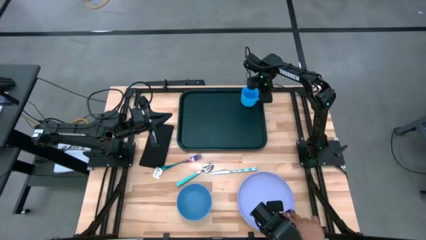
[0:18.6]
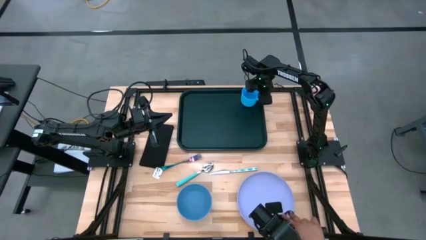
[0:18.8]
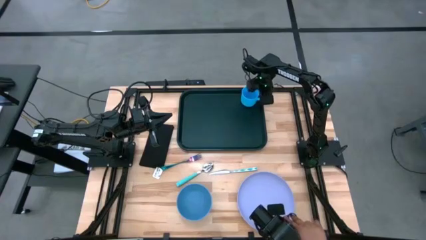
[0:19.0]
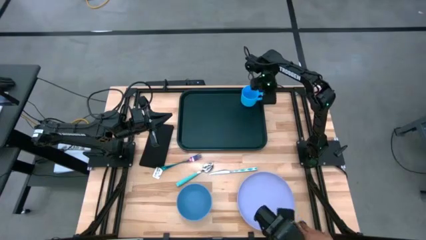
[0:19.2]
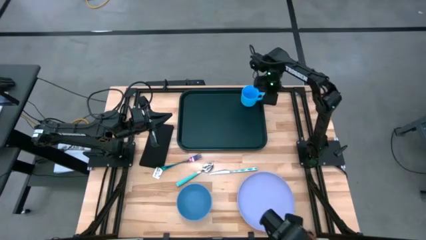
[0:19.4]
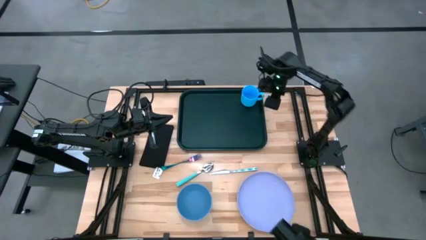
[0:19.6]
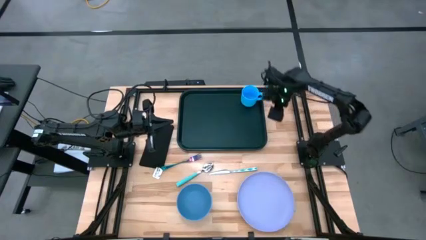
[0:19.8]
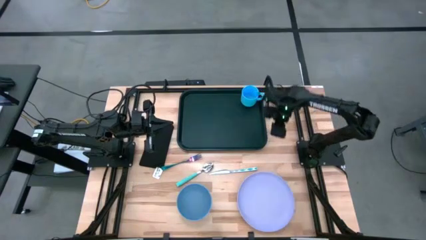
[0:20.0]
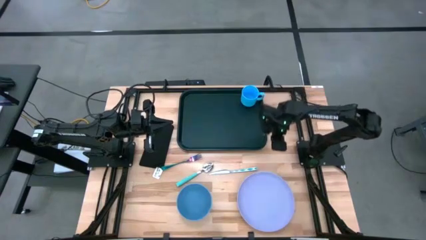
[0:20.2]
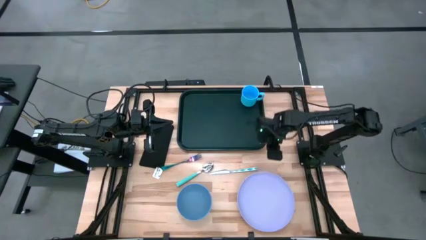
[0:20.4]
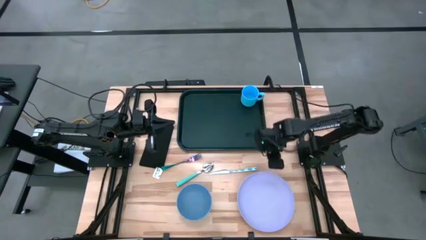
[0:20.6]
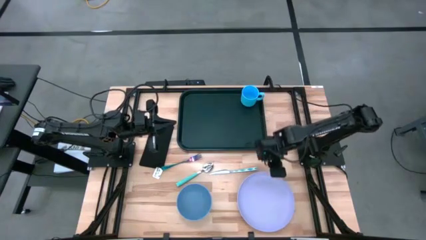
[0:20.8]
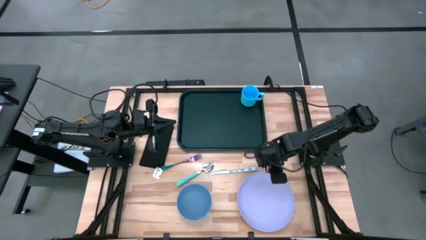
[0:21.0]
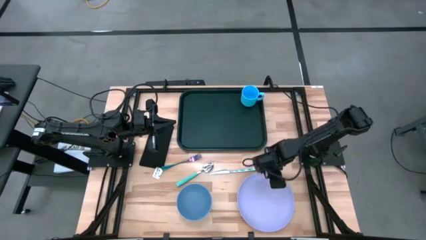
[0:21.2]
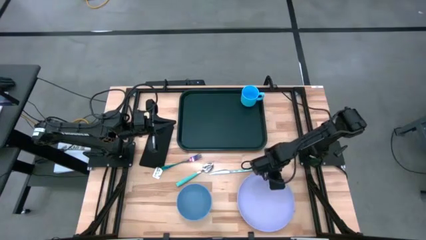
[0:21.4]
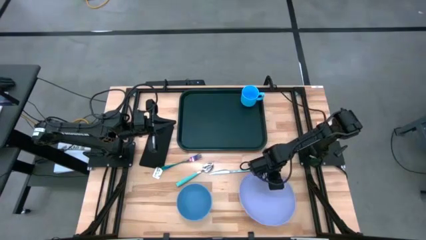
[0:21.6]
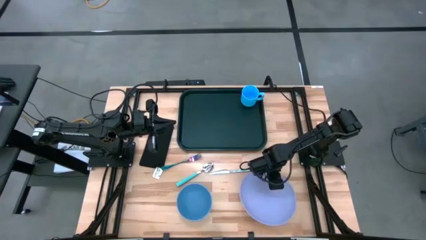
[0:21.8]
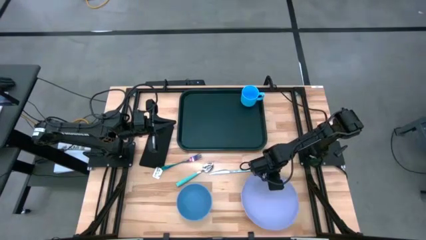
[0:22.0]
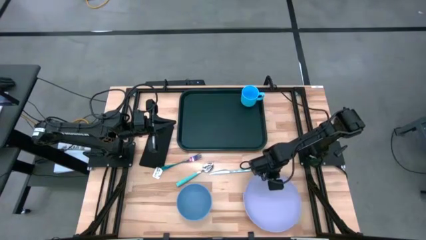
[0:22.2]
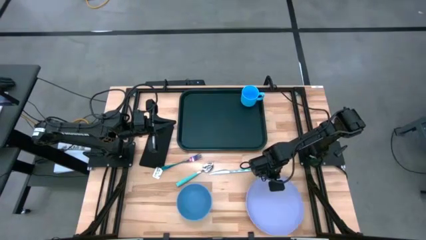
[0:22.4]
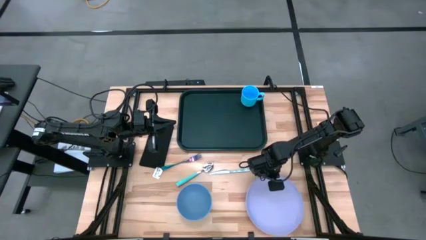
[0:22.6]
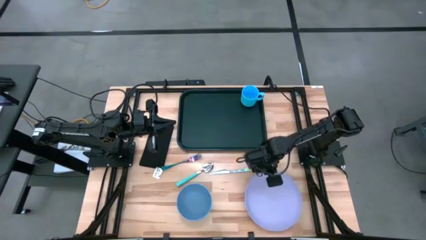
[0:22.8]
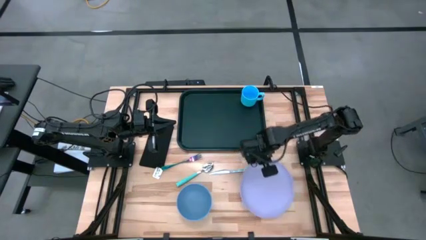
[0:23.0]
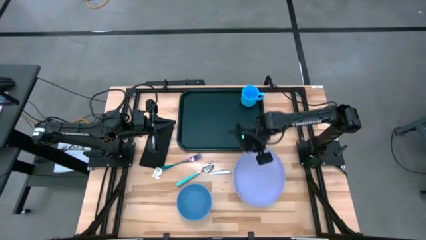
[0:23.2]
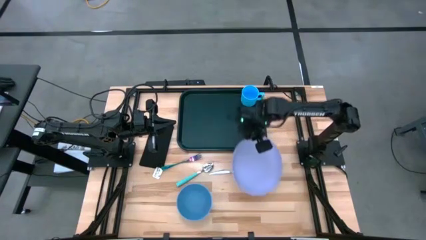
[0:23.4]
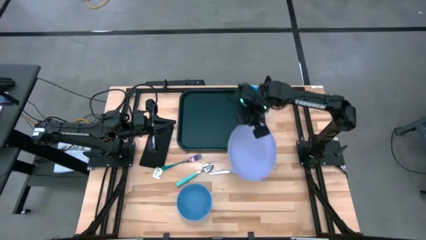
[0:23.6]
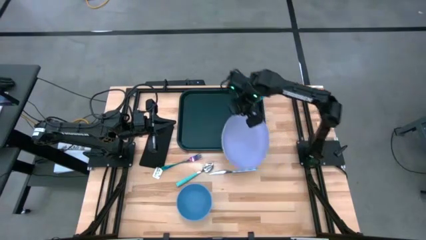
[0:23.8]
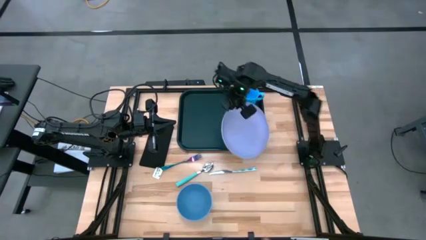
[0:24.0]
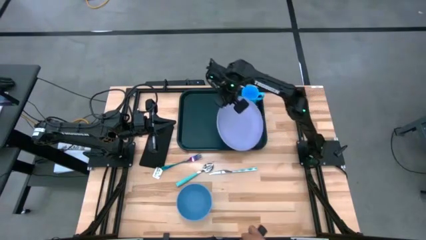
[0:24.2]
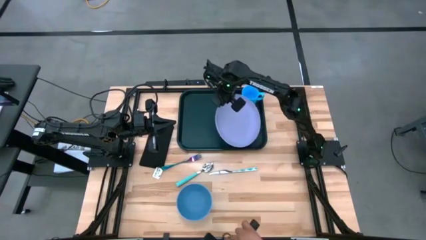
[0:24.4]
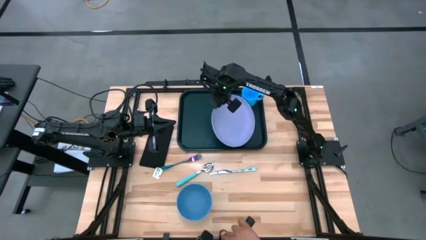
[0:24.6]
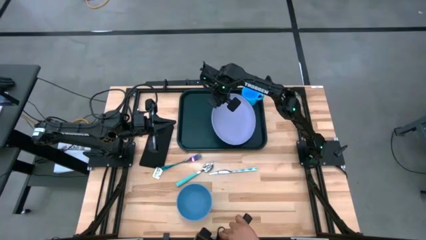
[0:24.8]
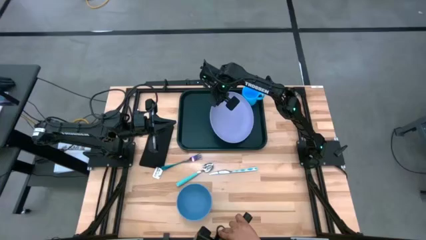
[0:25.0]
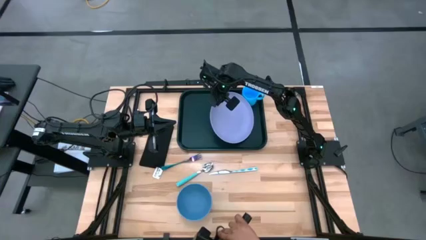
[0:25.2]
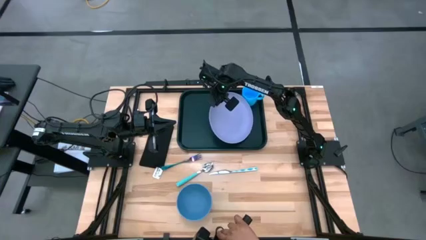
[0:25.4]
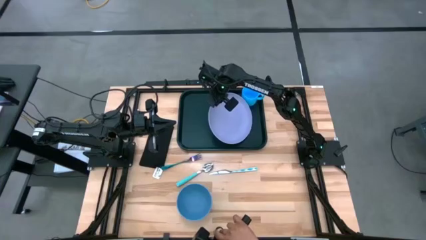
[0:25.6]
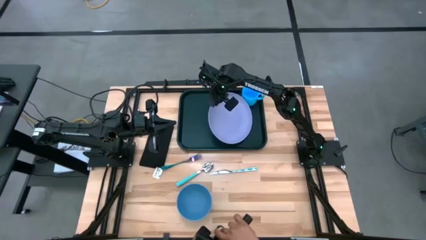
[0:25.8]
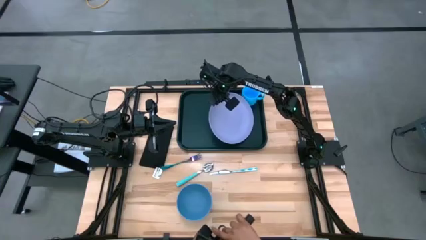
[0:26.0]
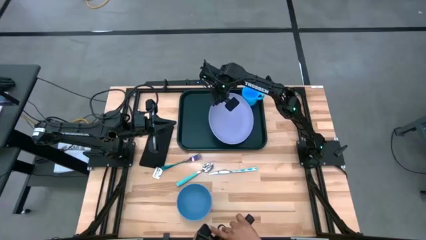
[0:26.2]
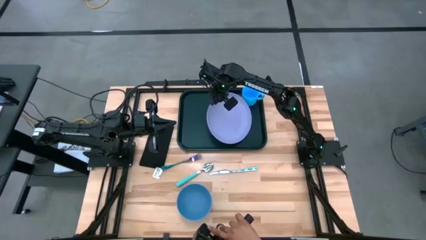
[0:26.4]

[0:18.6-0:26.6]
Task: Set up tray
Put the purple plate under the blue mug on the black serving tray

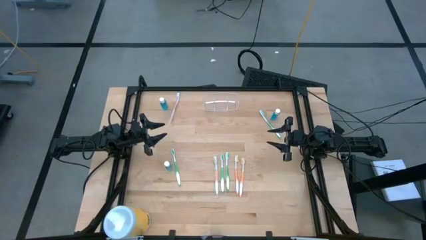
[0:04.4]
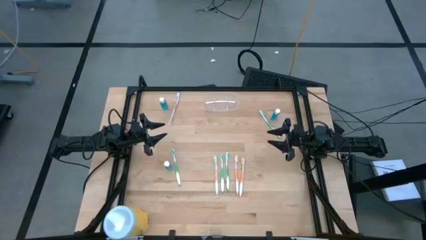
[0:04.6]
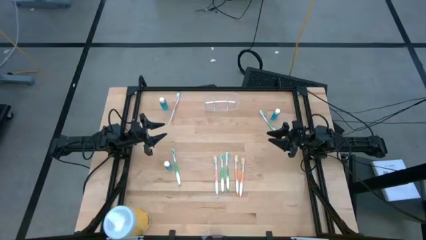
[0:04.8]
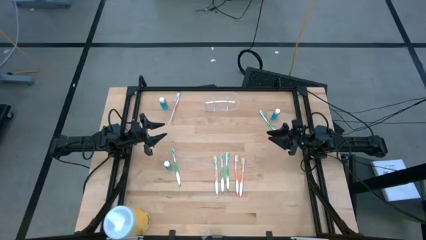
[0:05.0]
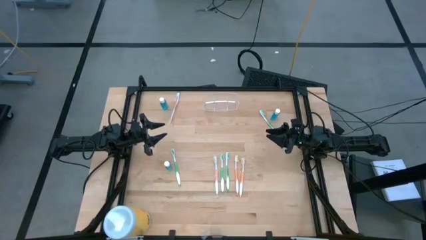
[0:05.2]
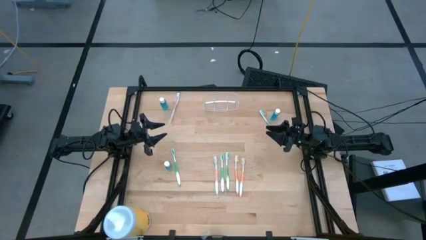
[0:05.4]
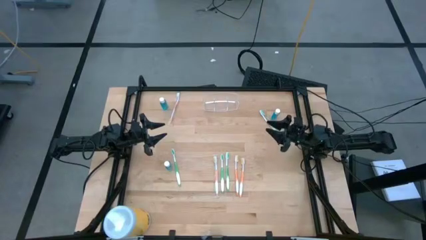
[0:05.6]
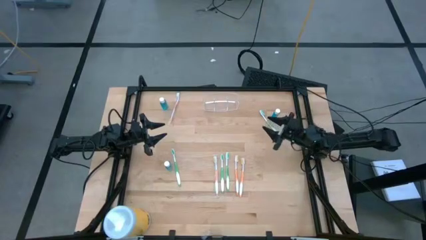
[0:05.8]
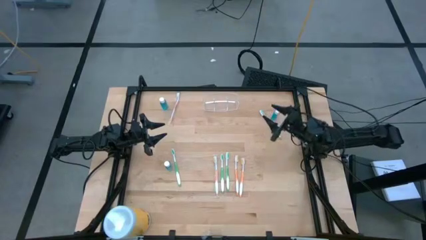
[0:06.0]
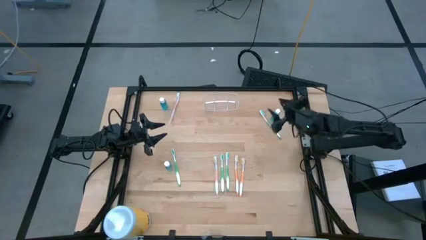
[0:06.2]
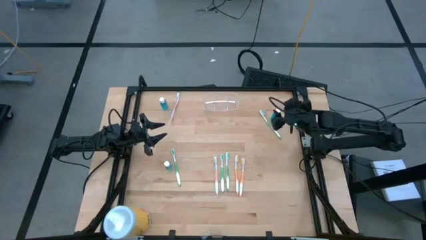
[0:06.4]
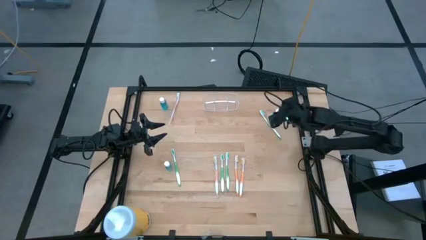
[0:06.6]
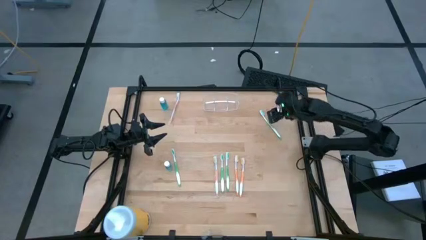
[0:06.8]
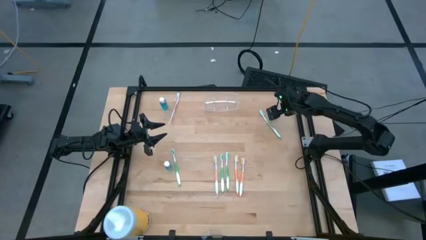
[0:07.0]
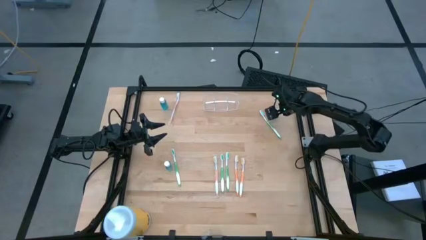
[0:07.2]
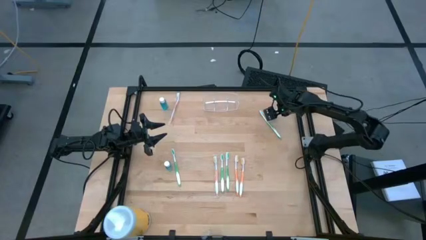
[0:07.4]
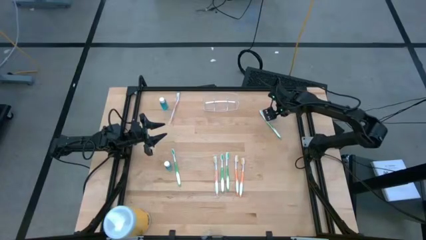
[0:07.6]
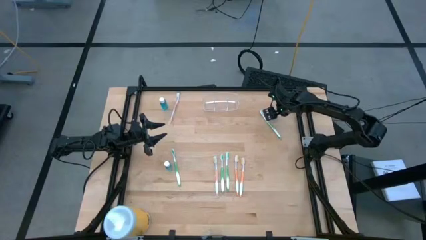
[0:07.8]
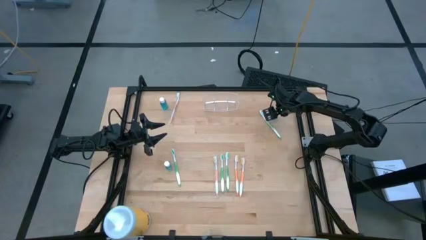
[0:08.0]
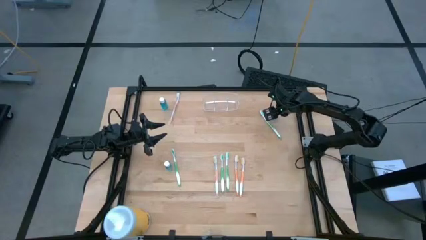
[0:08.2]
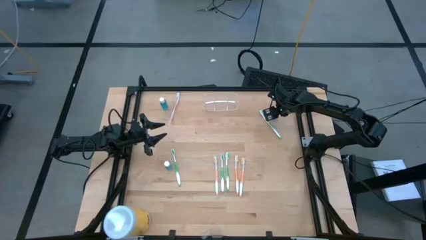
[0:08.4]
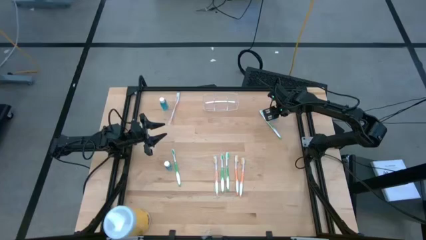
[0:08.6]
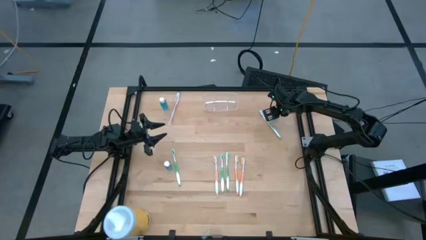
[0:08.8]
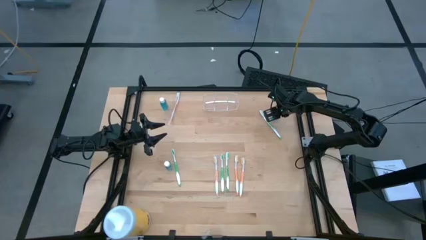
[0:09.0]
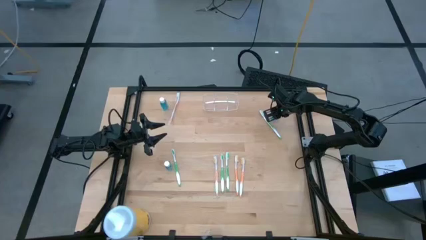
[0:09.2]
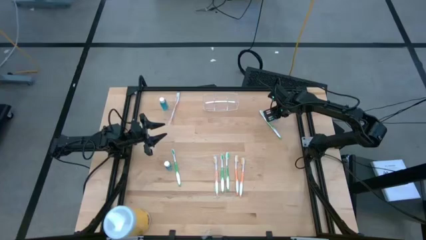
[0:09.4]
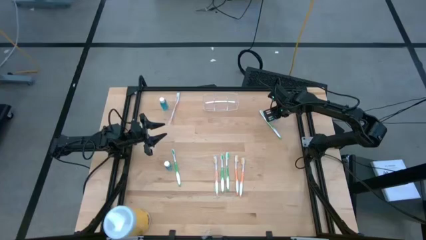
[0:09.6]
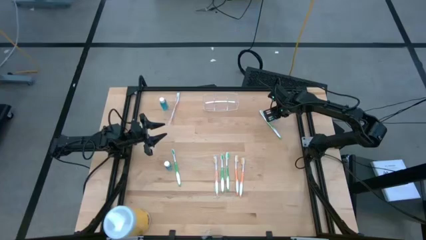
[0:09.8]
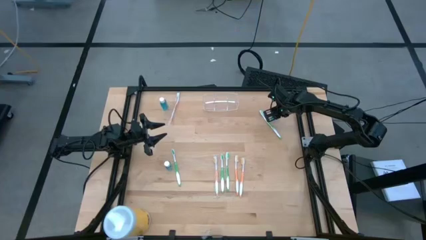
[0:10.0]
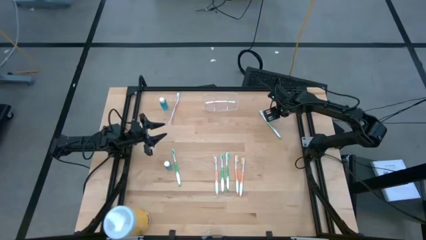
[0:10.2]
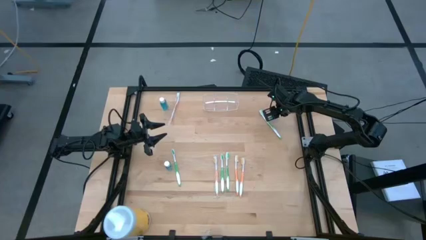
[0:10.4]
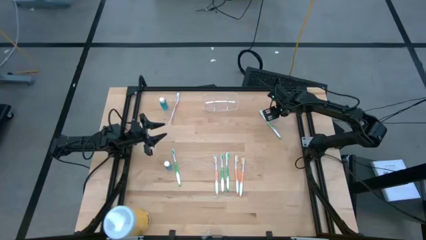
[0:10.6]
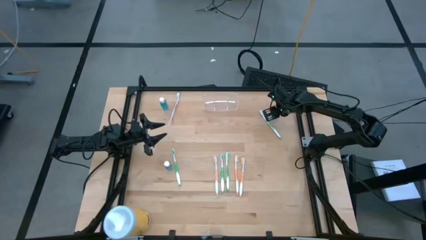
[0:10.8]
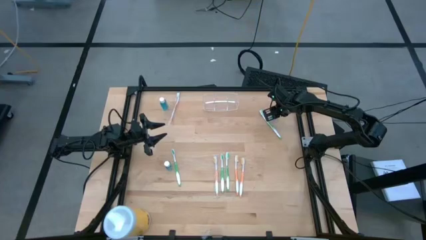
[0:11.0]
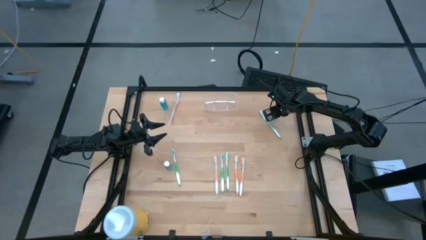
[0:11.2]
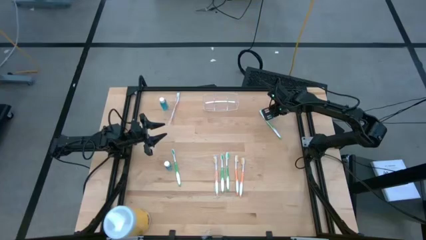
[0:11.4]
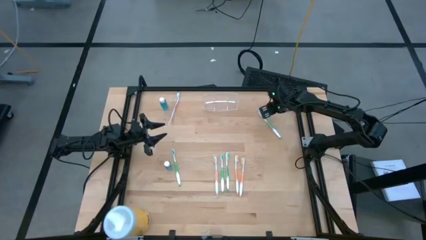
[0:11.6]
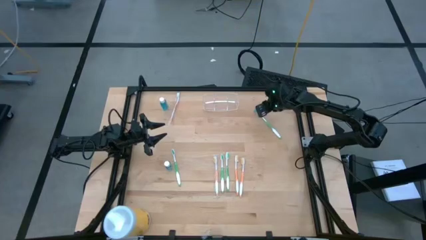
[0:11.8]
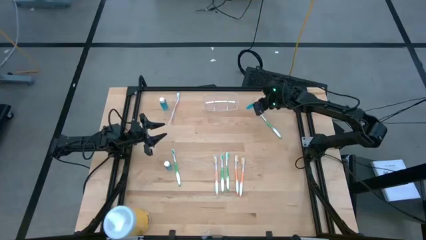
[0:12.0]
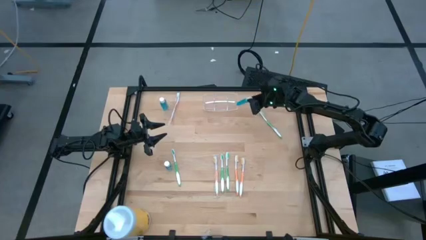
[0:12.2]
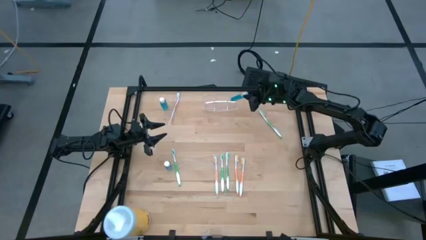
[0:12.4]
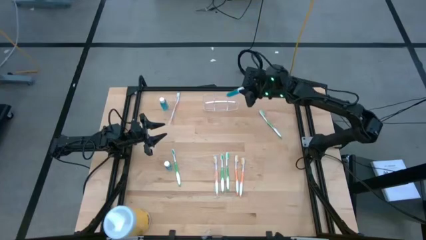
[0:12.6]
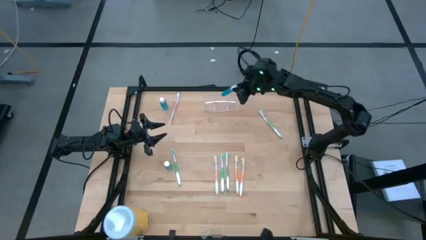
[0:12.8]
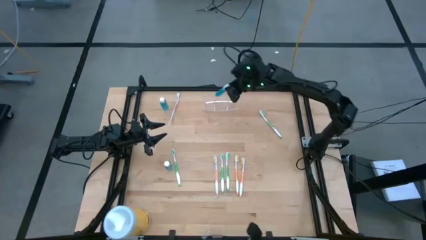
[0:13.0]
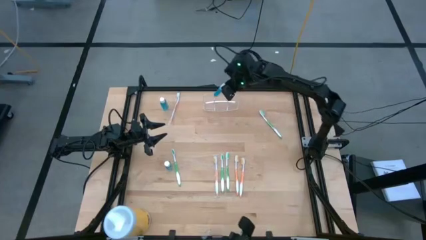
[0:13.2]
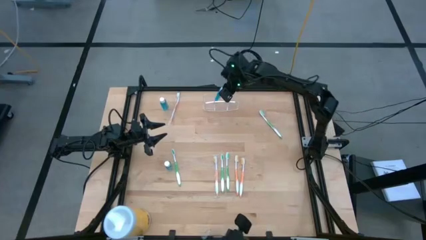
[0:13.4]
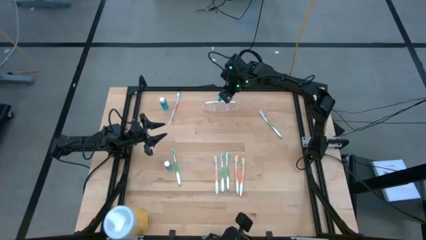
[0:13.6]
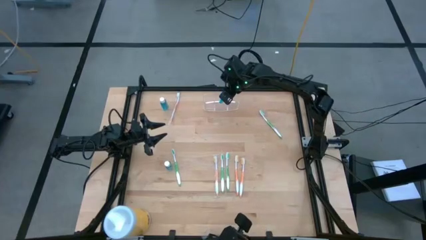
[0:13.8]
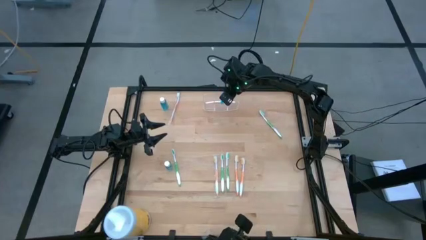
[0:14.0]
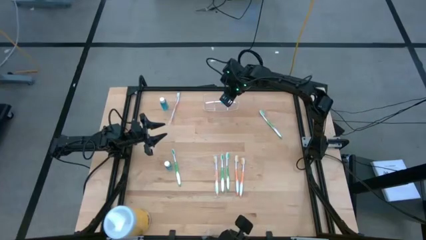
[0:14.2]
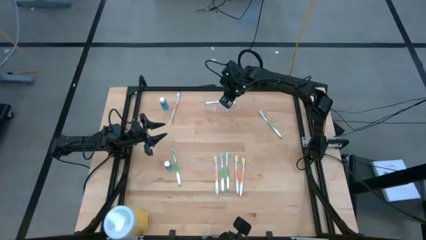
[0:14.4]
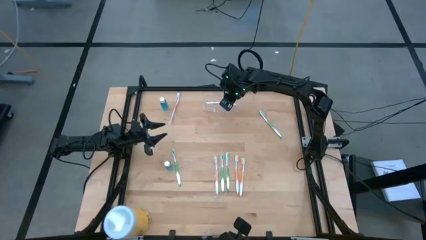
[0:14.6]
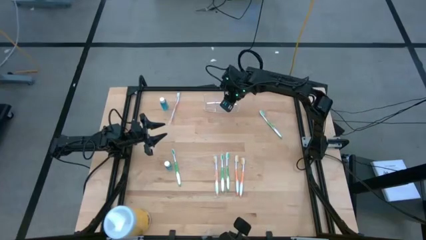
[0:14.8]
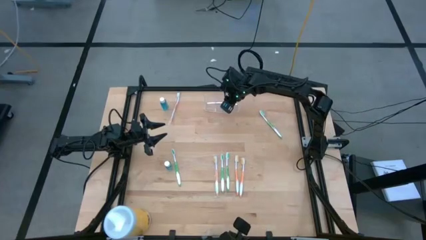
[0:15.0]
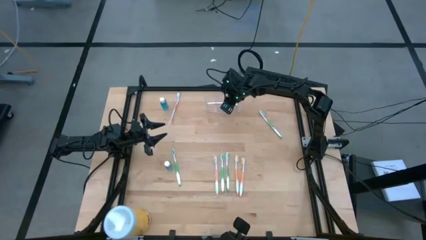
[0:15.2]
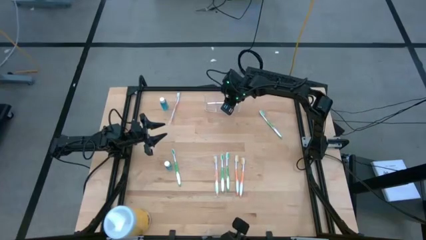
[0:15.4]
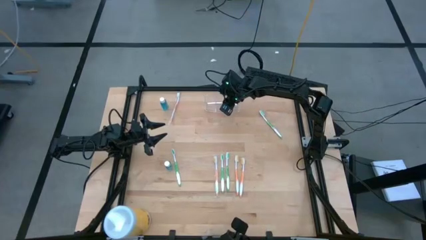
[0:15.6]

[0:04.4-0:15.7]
Task: Pick & Place toothbrushing station
Put the blue mouthwash into the transparent organizer
